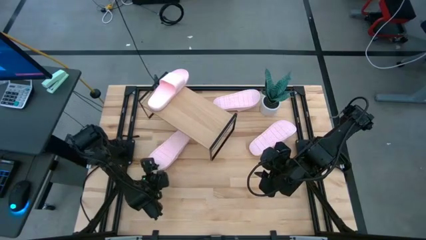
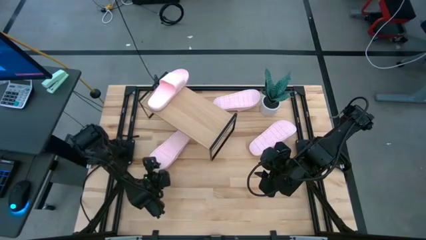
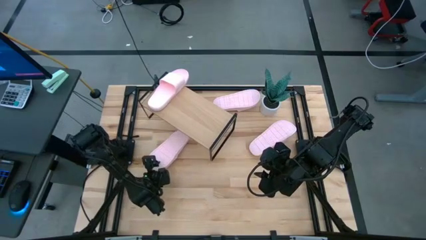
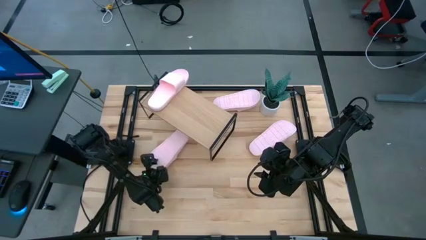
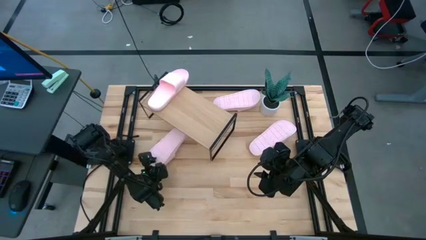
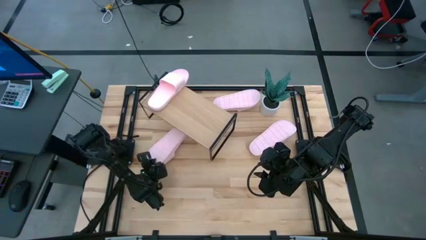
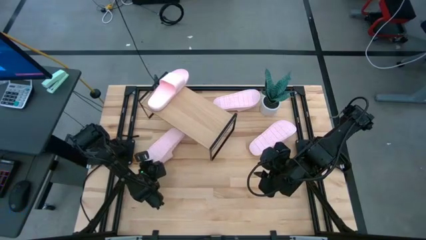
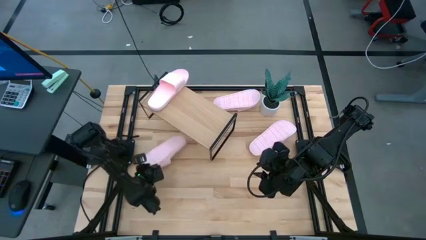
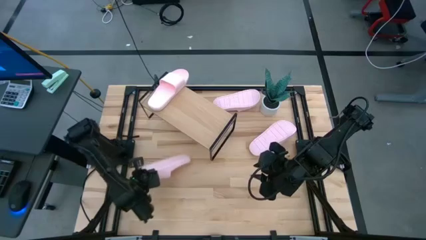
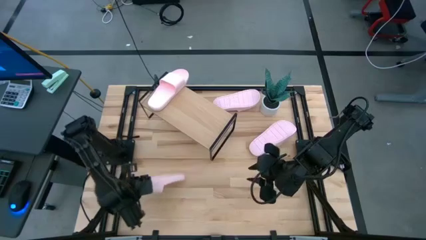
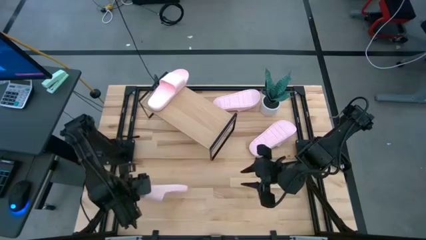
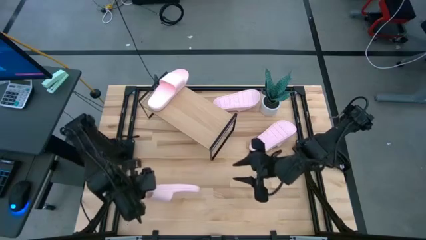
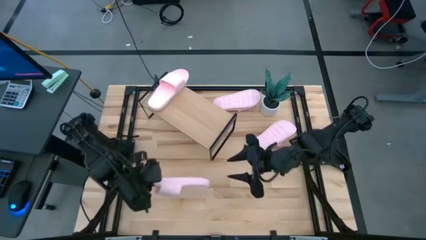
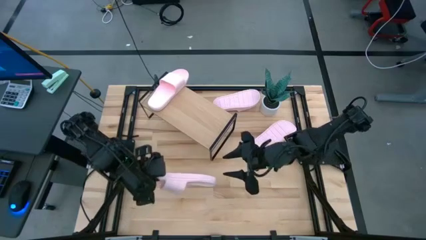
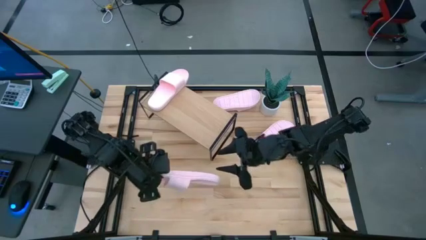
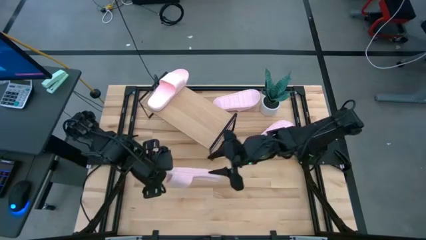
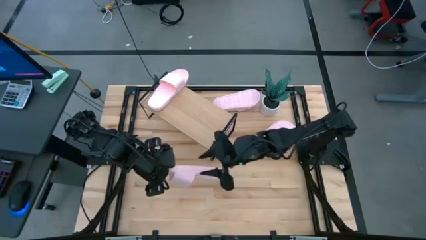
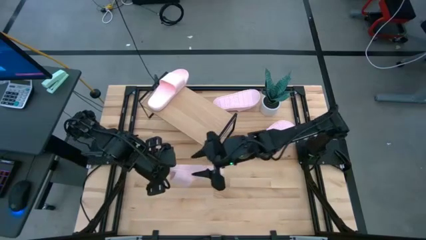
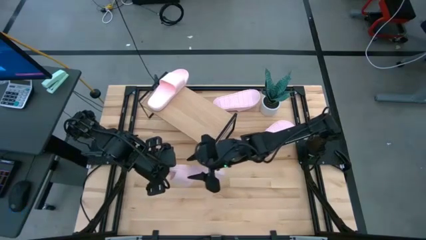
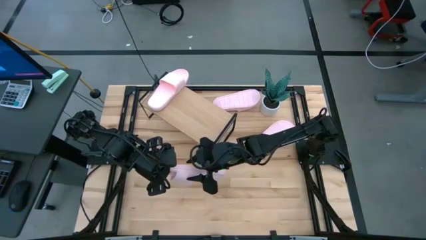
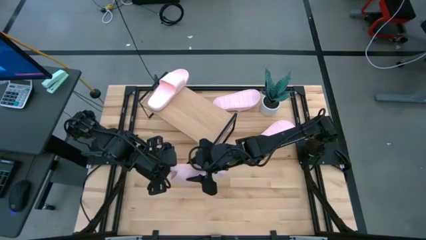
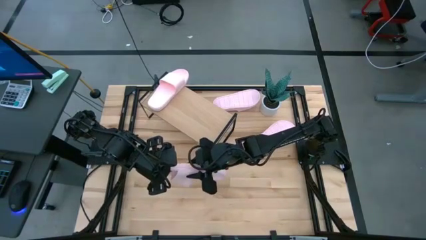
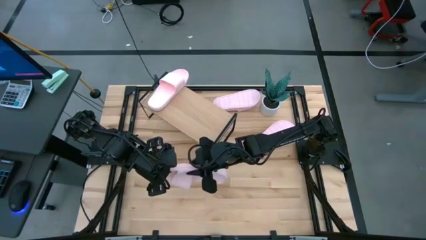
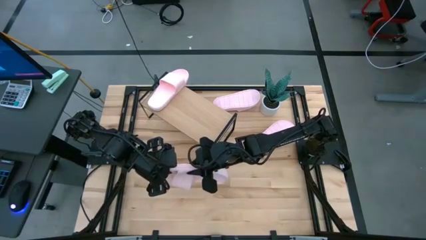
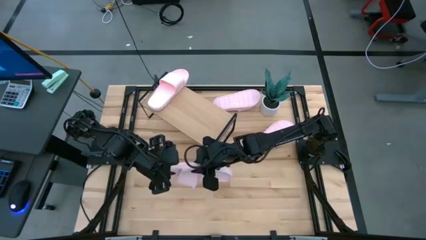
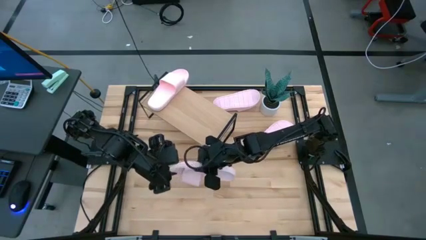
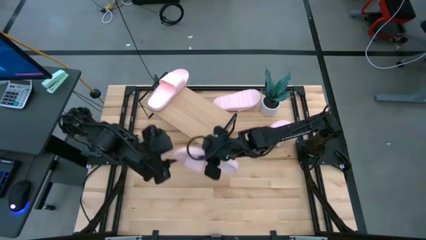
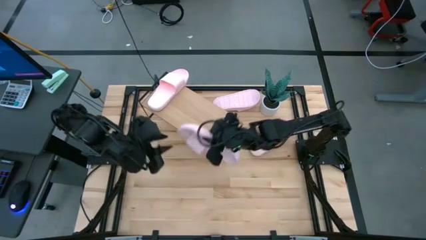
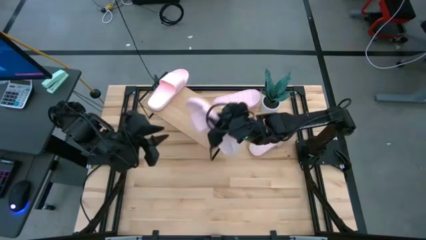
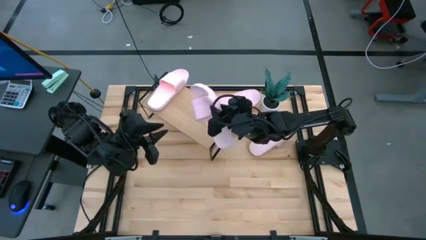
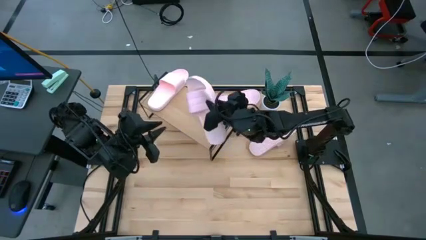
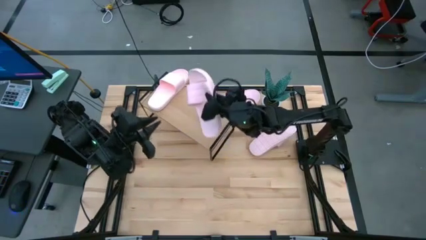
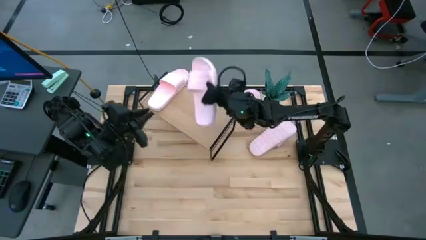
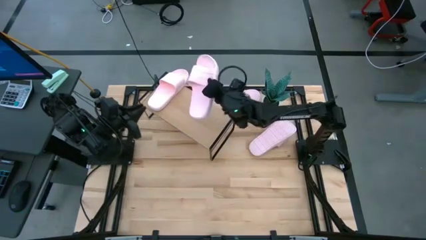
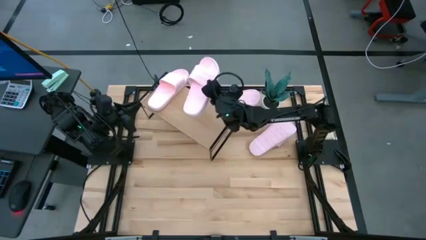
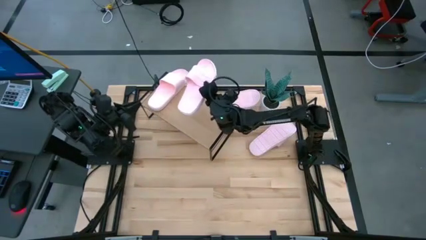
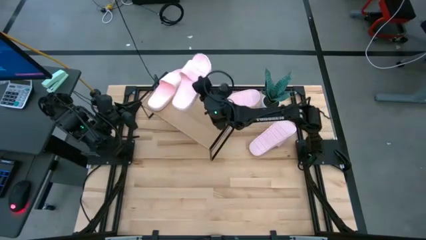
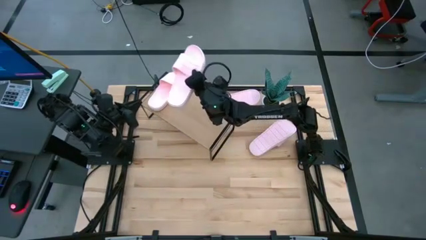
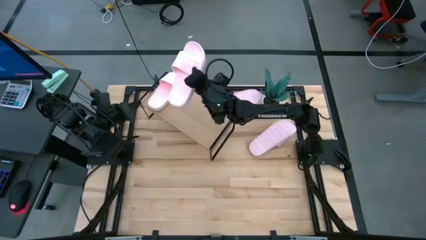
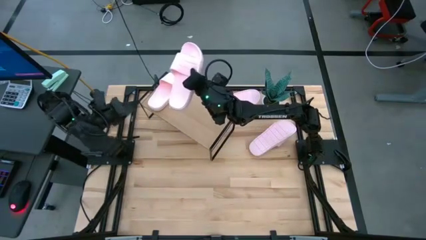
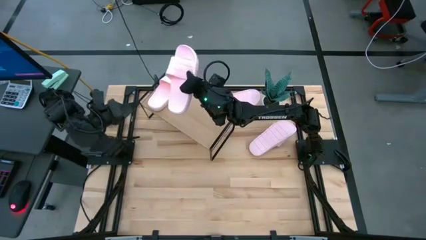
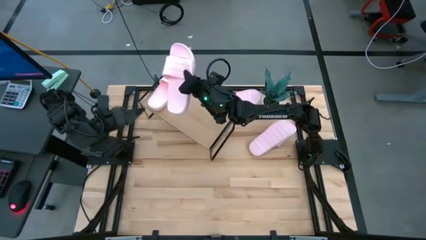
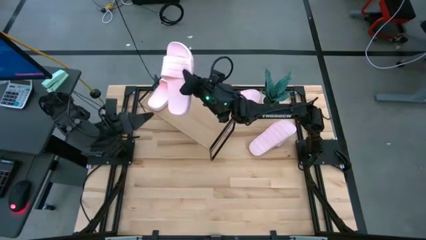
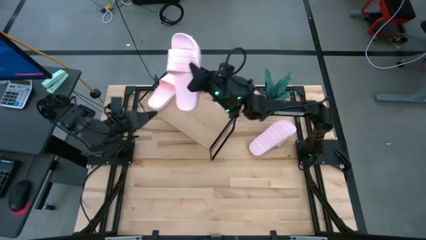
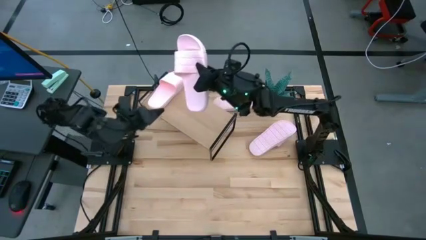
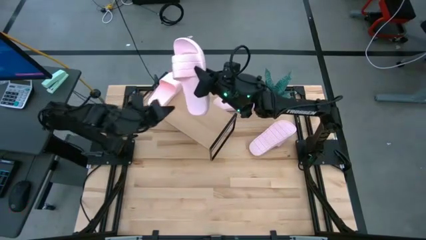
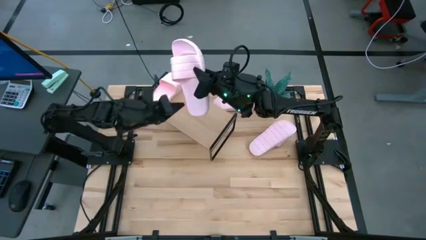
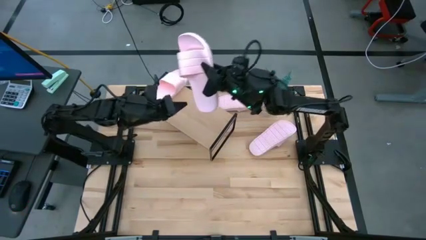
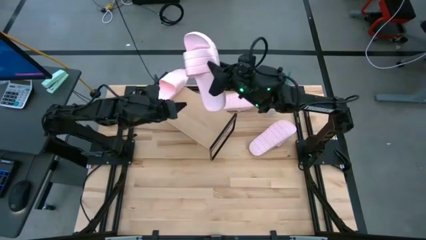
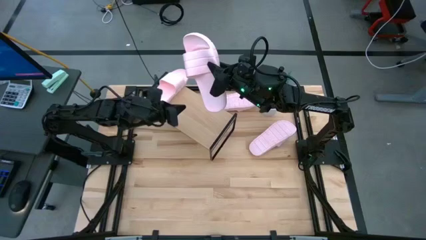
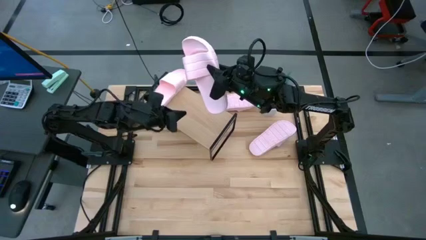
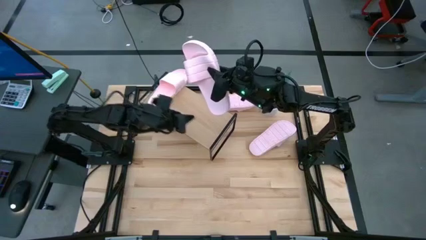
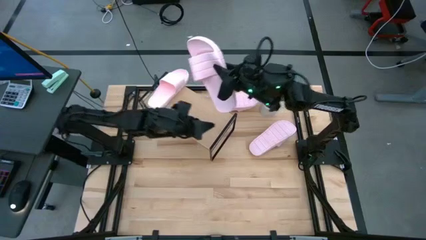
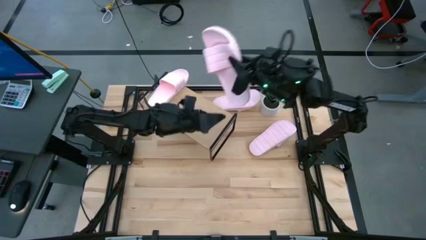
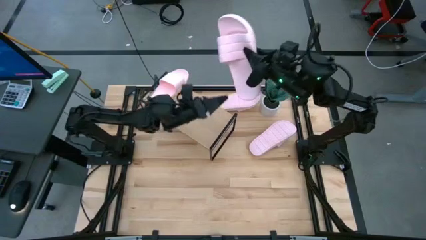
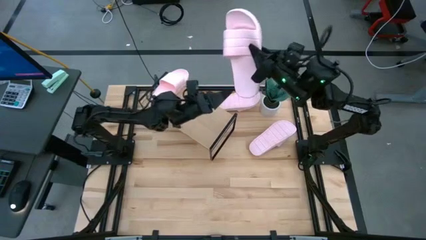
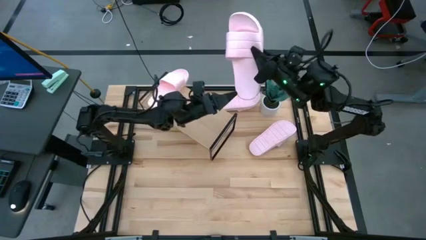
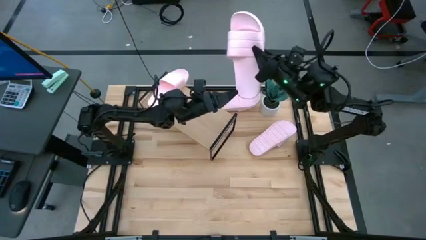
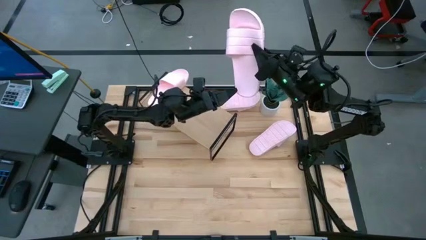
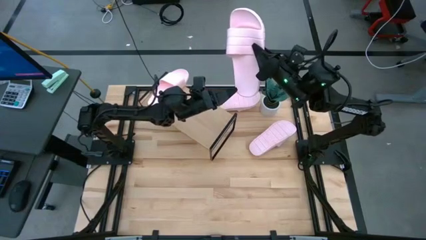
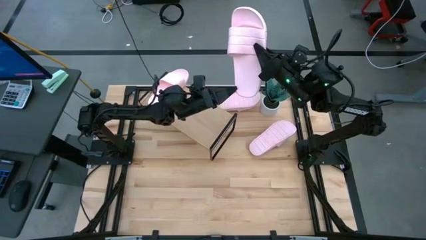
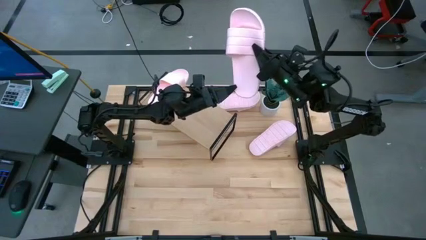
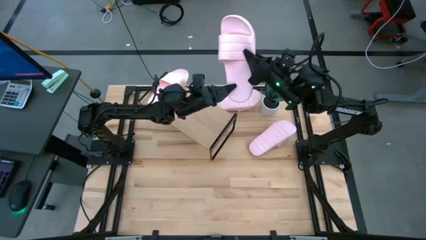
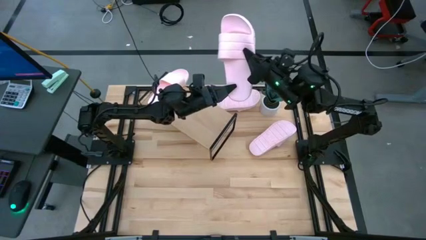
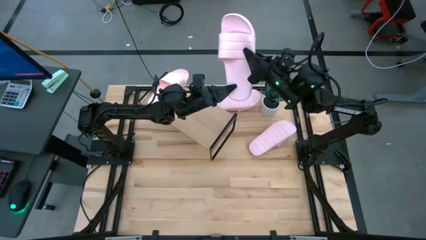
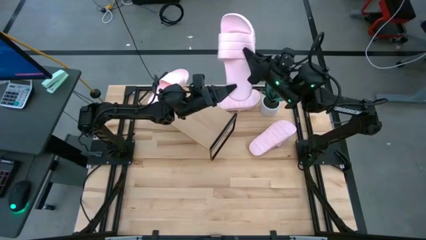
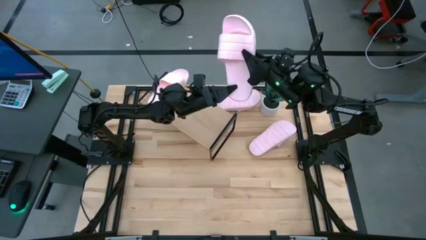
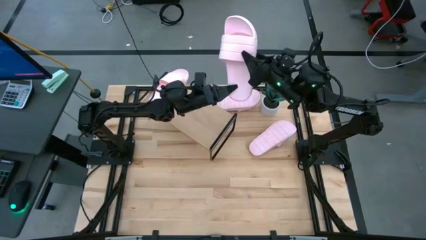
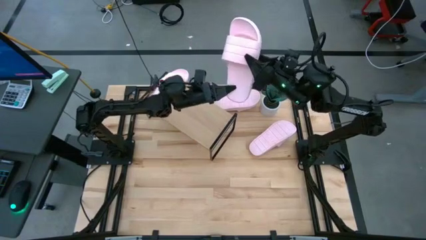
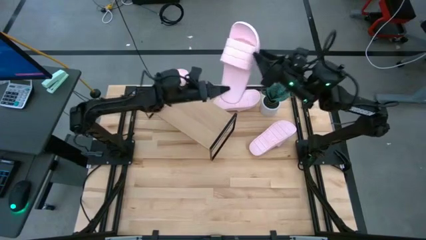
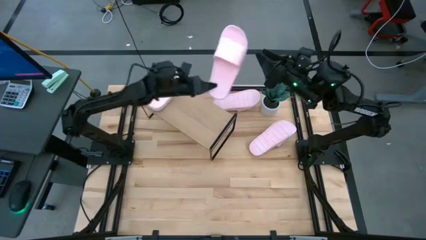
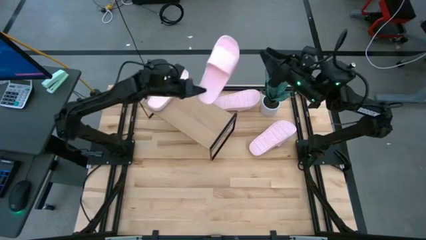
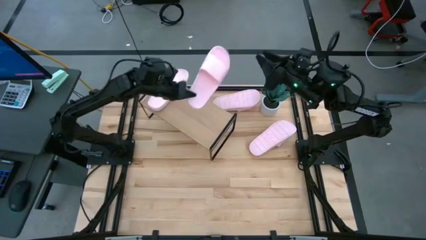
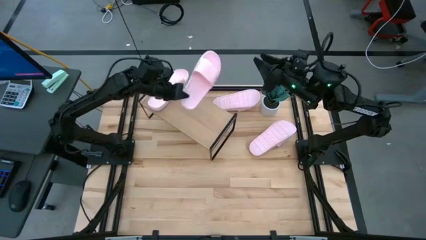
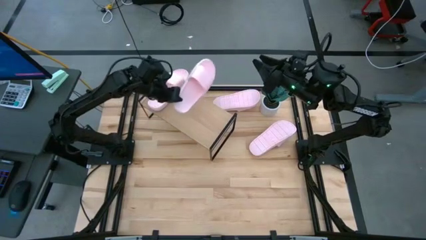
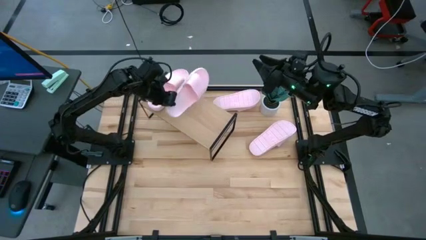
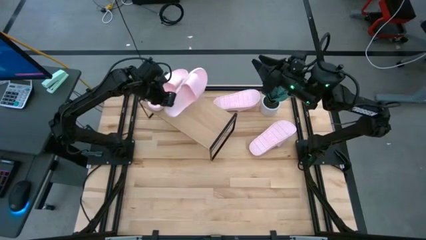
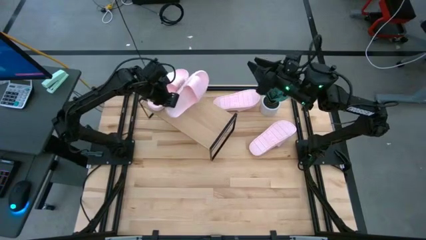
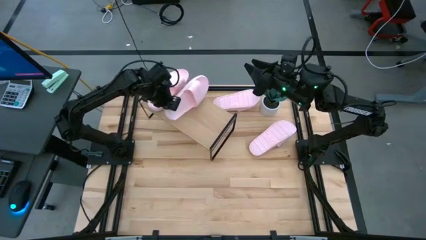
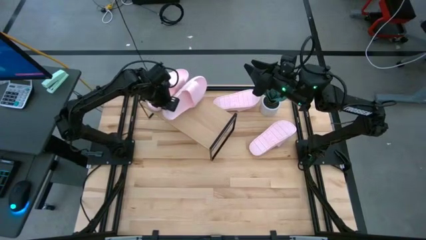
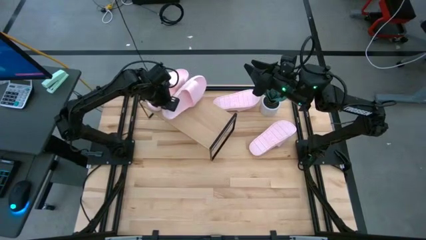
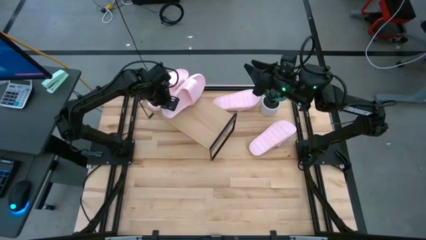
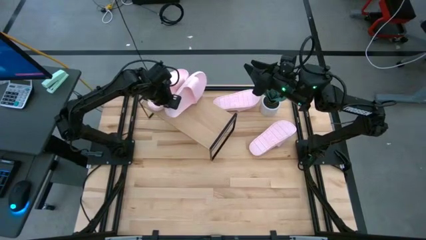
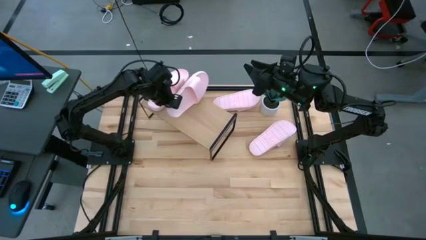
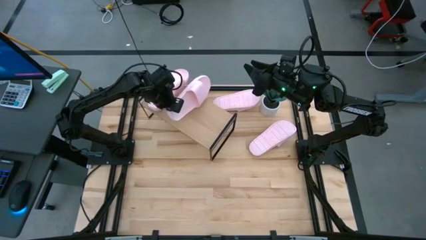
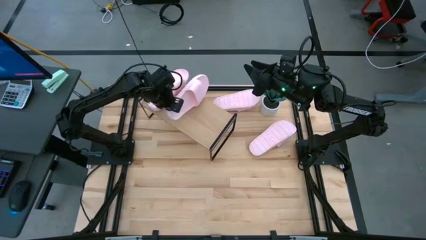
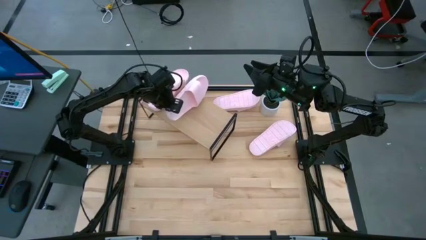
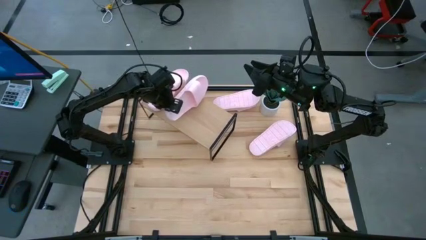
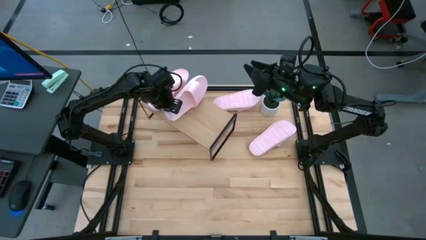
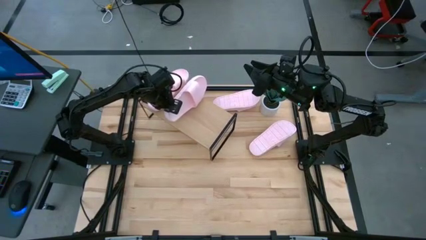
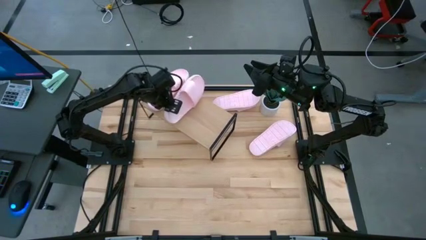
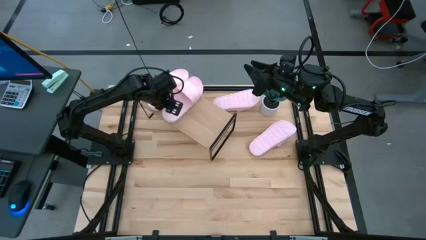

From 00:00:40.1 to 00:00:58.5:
Task: Pick and place slides into the shelf
Put the pink slipper on the shelf
